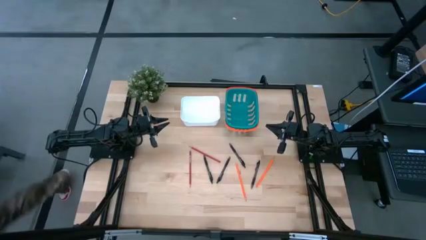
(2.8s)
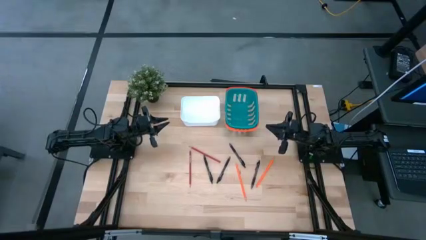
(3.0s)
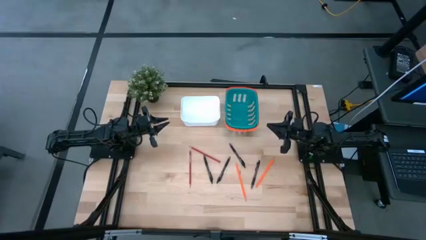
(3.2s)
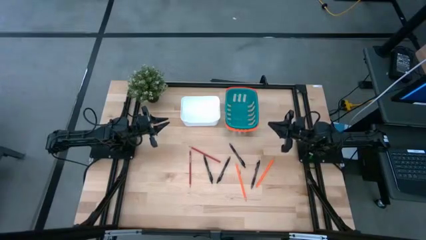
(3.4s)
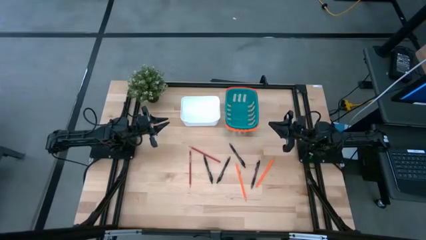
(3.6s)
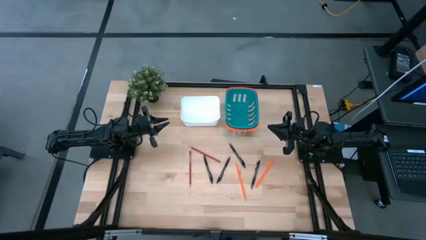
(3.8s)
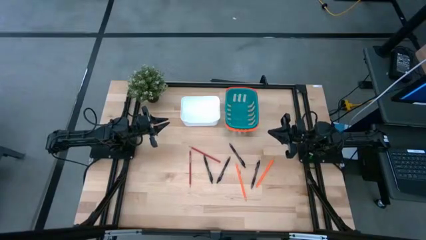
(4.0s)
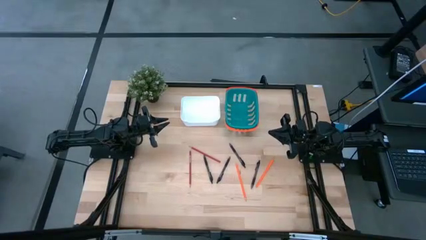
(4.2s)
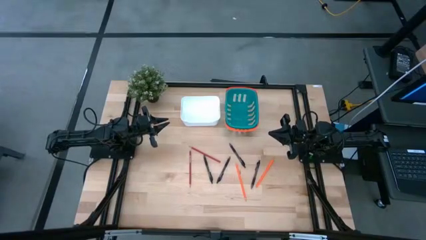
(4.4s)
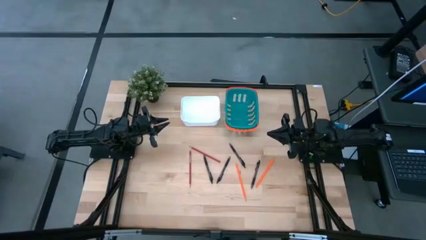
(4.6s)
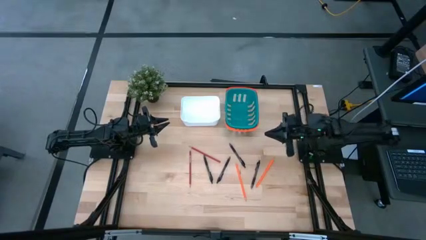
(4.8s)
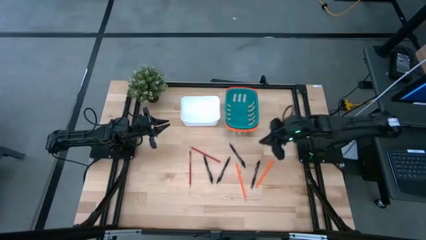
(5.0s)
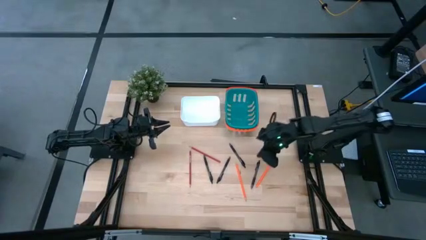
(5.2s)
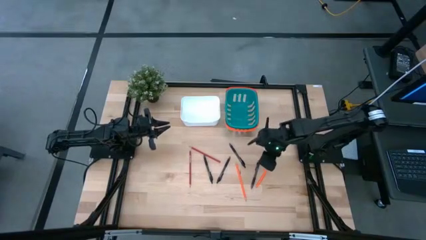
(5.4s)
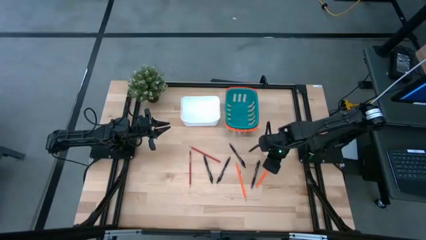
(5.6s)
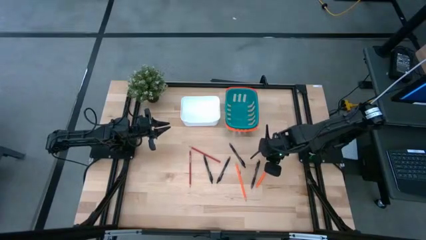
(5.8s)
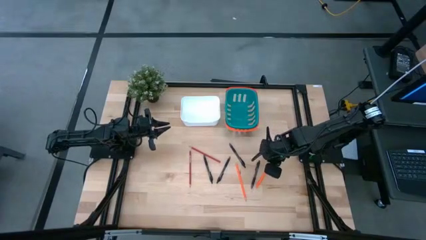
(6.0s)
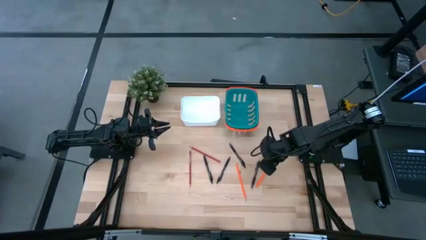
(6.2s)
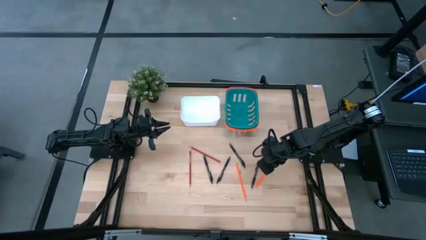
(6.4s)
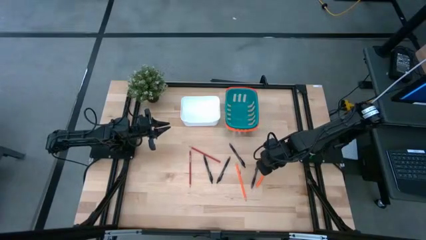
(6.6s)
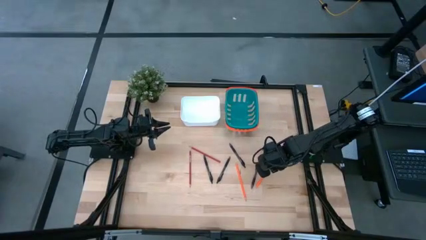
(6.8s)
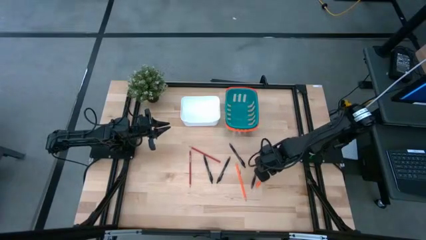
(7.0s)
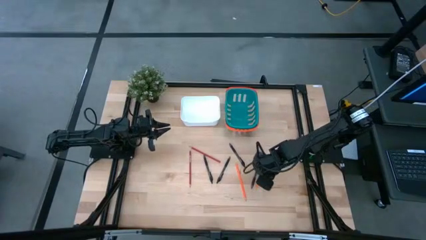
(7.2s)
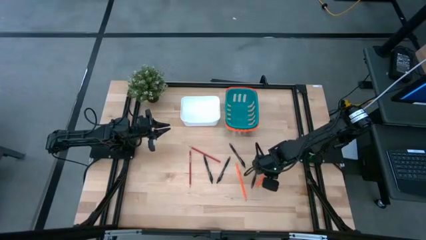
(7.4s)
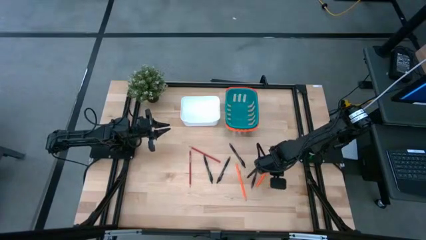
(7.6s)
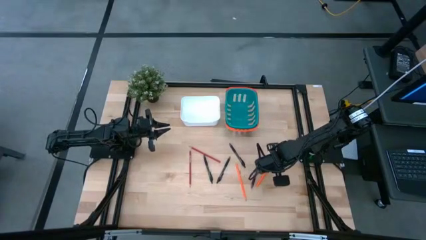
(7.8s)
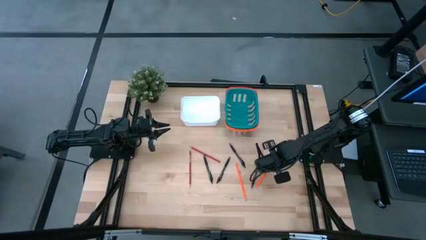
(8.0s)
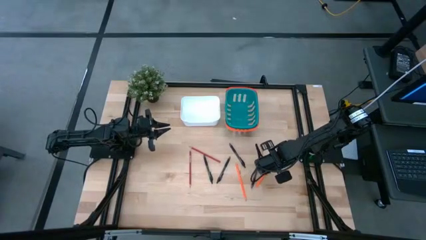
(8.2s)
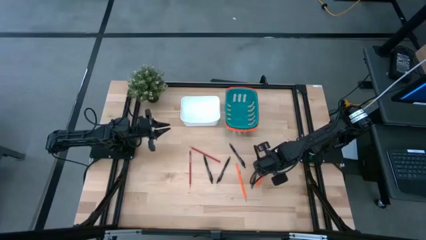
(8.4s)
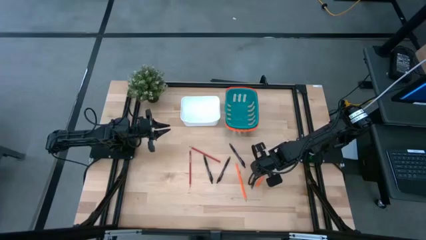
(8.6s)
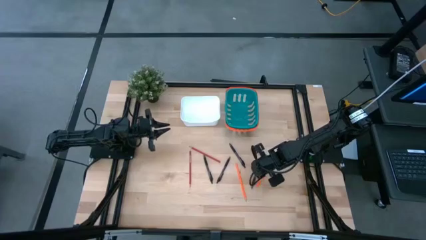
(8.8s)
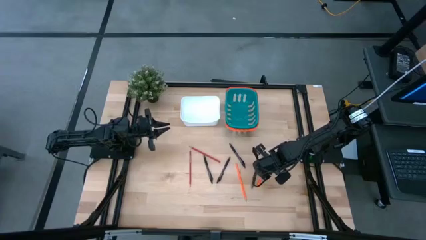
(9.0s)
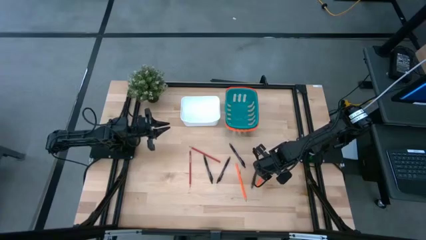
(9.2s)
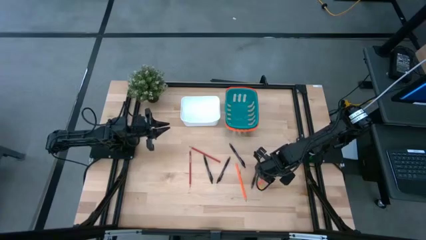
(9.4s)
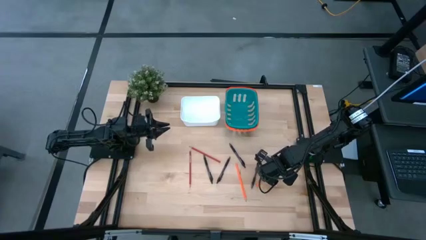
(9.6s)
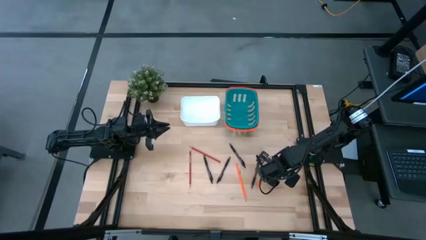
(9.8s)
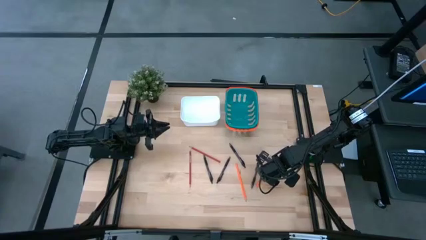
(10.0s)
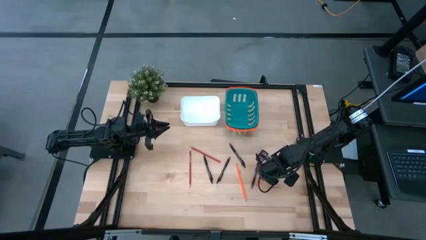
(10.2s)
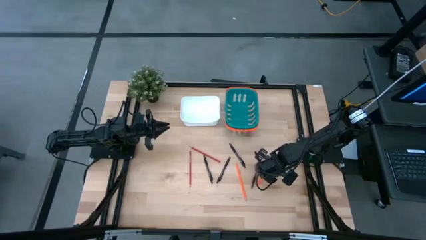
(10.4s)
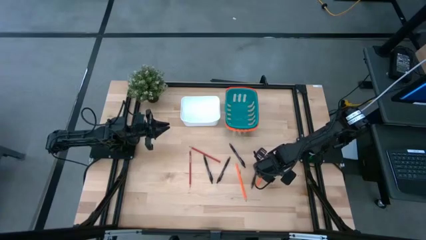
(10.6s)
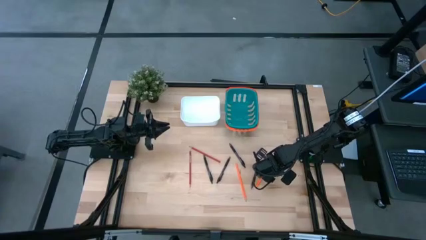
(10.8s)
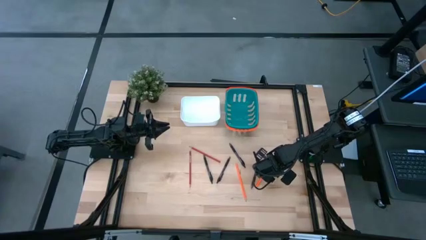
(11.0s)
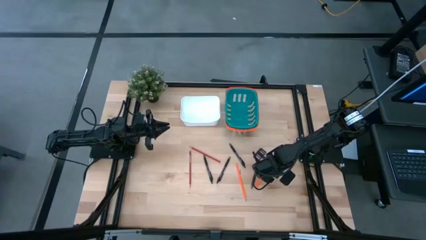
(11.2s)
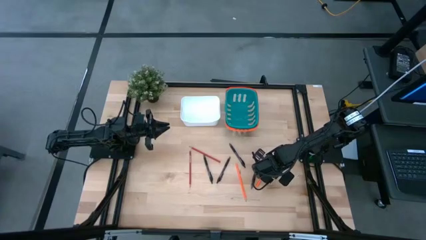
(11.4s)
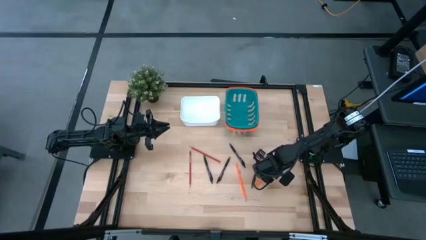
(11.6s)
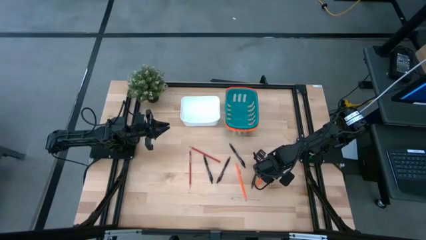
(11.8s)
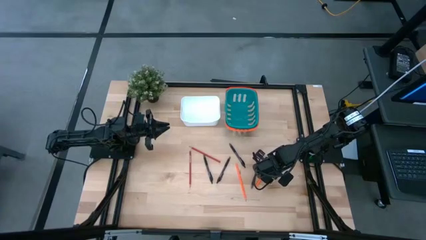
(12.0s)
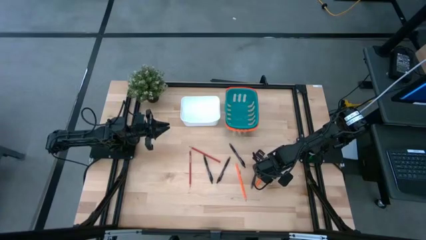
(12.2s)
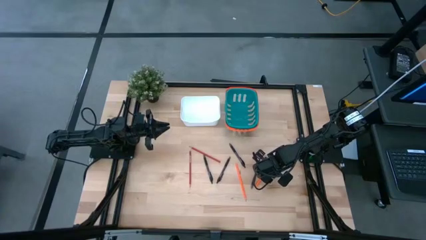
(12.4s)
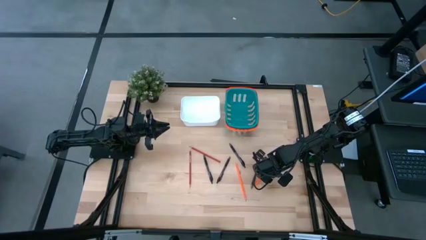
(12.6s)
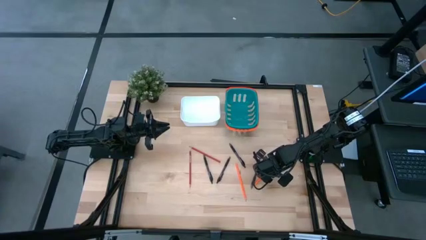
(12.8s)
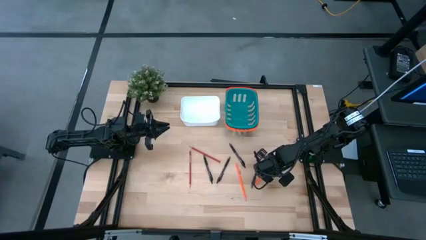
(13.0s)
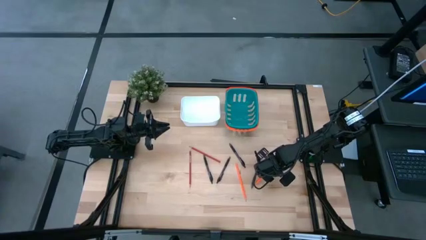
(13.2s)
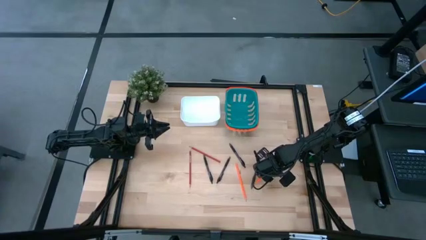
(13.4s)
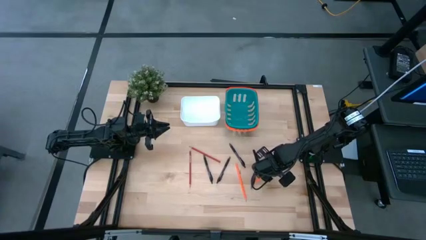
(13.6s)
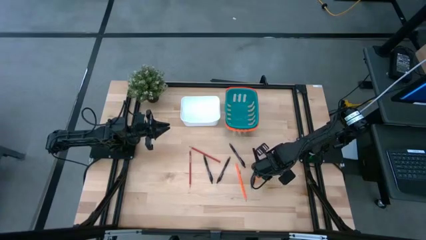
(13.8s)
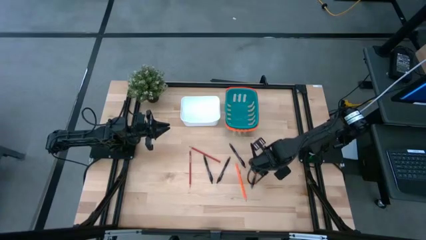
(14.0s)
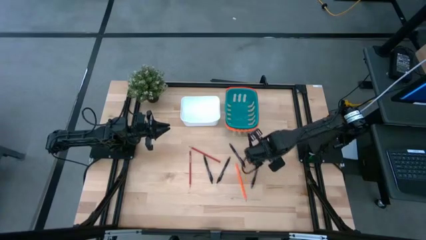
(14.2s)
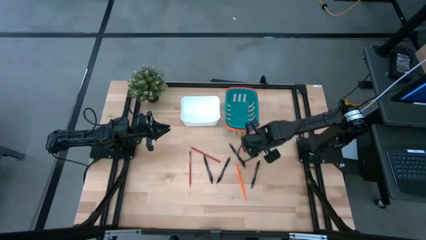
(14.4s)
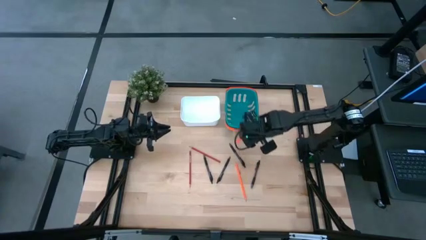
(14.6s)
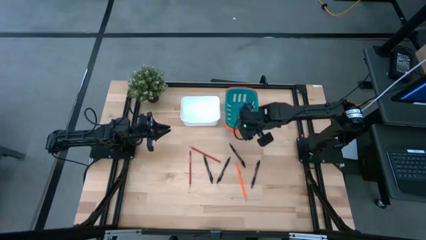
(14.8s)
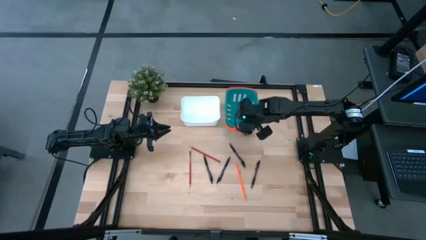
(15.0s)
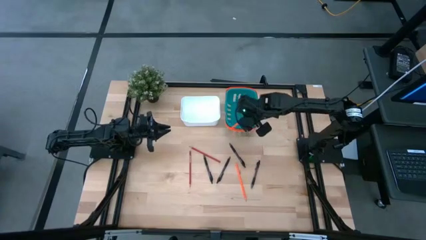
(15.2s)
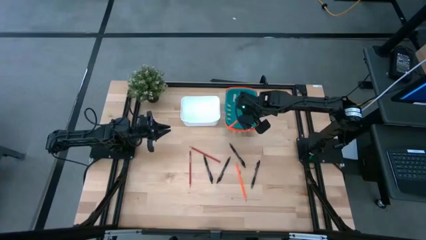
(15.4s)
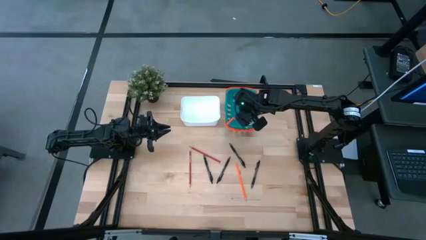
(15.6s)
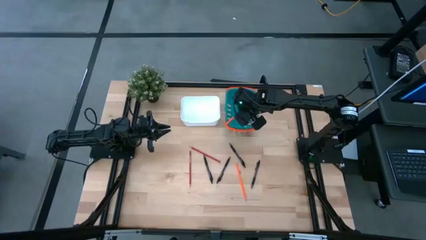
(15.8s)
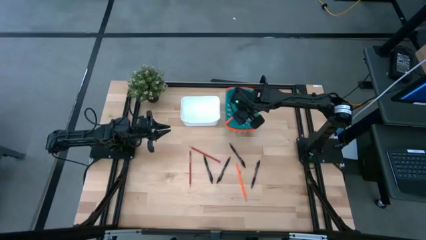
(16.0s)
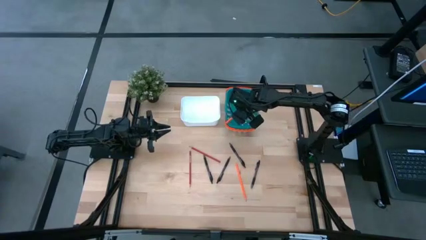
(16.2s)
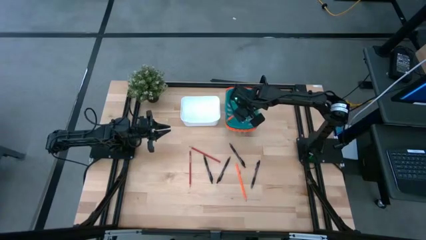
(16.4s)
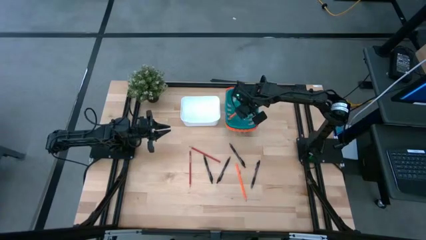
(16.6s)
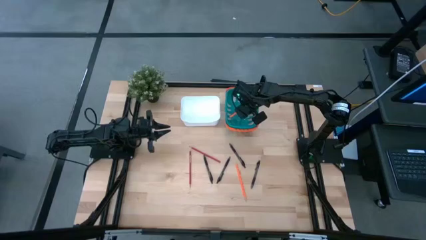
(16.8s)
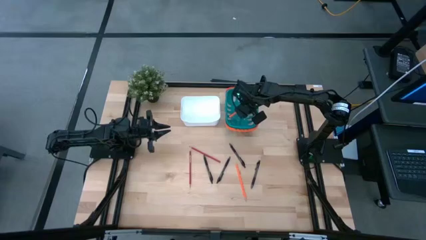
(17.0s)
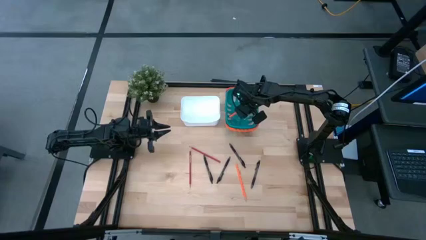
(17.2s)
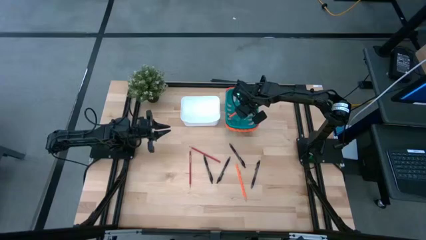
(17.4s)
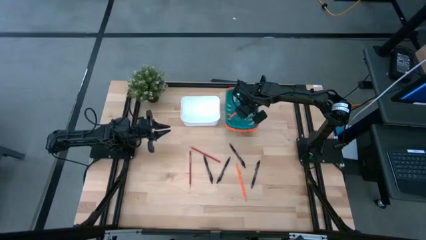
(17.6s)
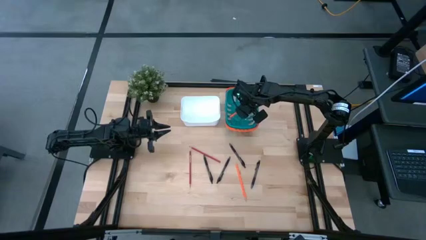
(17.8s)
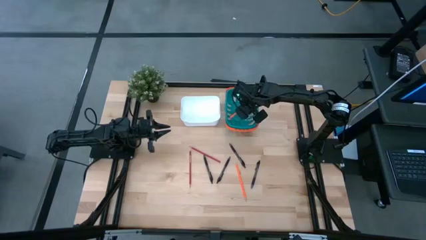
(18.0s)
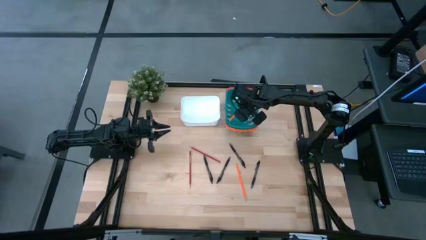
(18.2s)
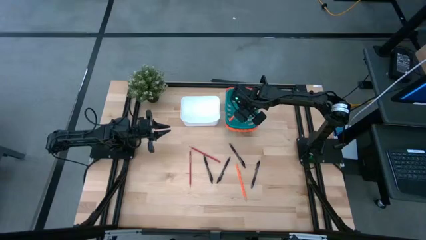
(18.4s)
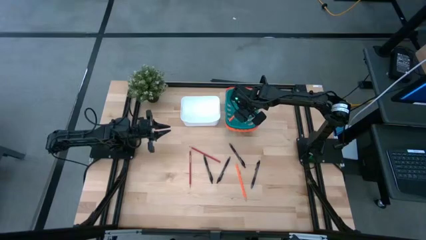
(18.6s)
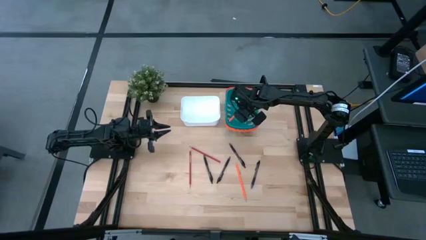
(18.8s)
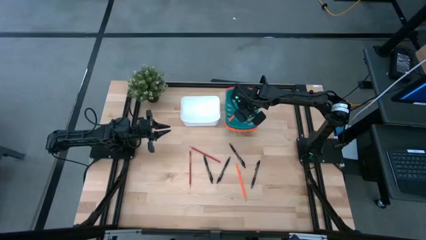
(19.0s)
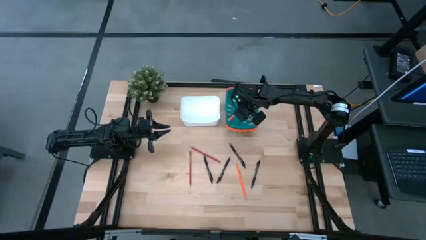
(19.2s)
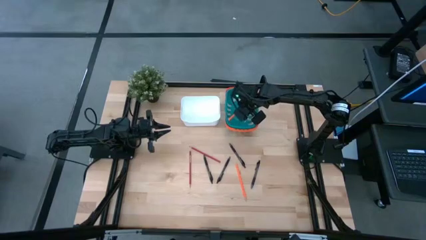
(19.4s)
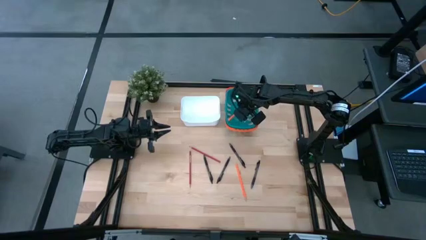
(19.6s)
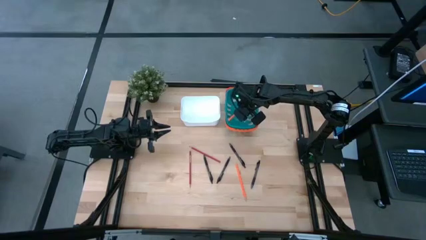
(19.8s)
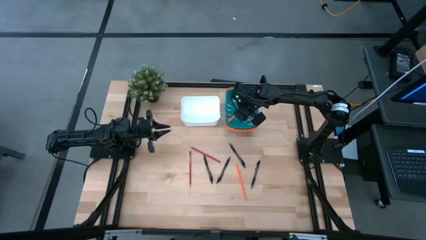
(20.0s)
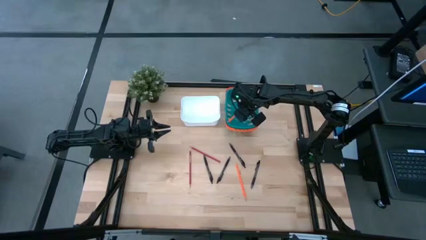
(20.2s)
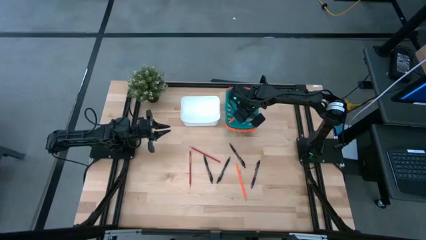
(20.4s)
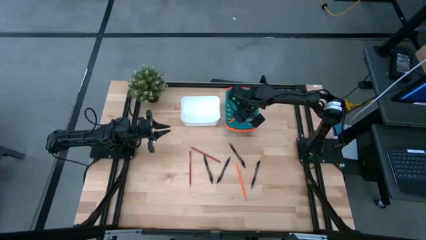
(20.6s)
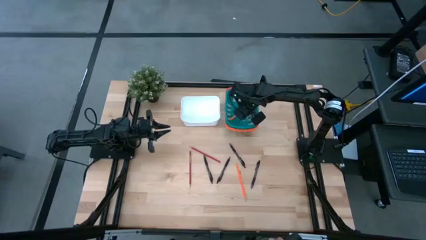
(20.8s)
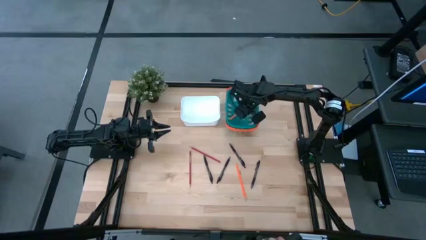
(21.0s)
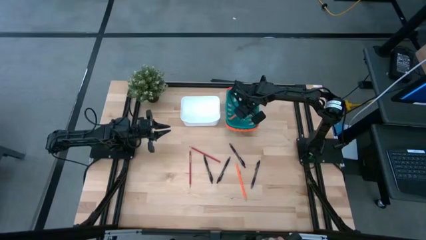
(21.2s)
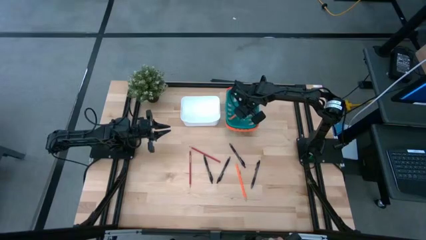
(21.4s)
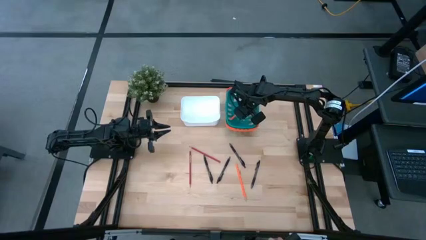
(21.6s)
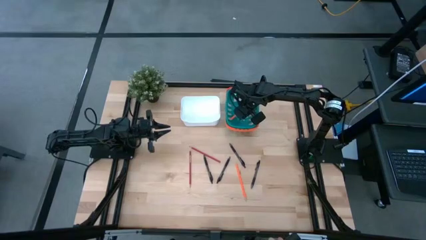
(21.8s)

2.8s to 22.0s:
Task: Sort pens & pencils
Put the right orange pencil into the blue bin
